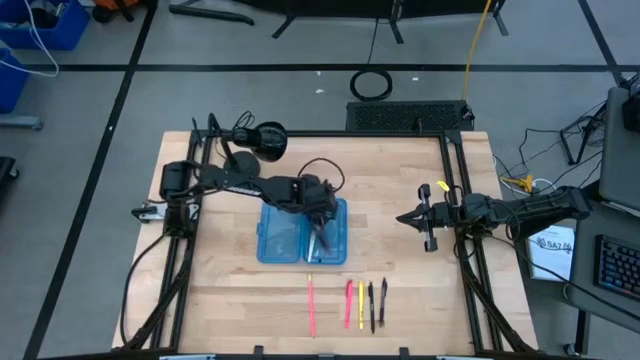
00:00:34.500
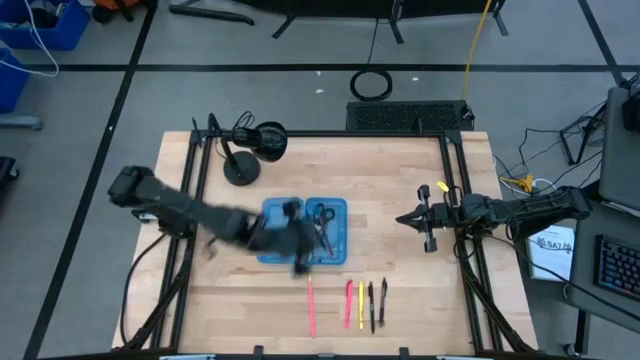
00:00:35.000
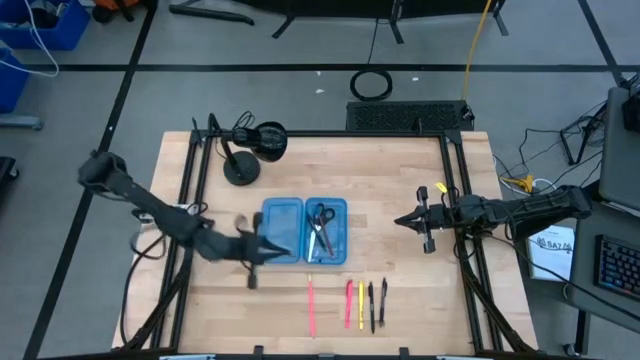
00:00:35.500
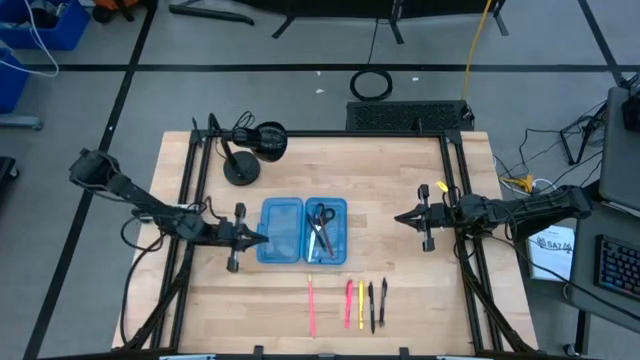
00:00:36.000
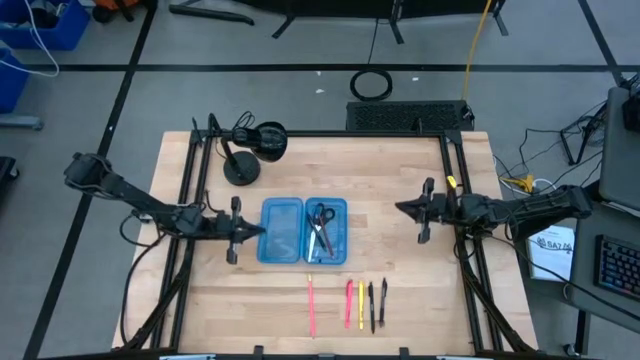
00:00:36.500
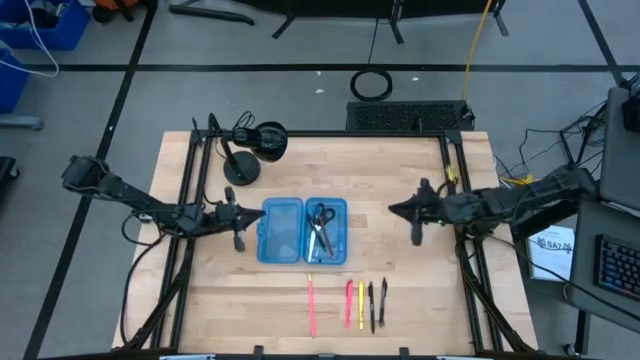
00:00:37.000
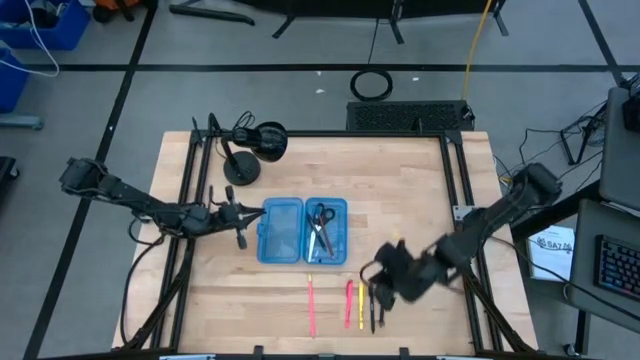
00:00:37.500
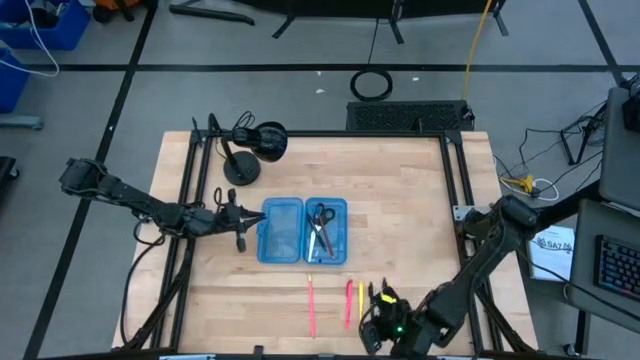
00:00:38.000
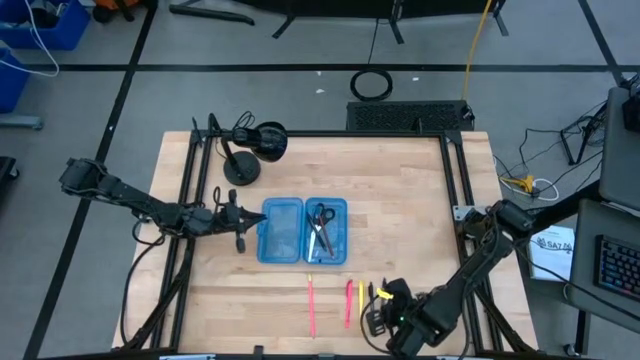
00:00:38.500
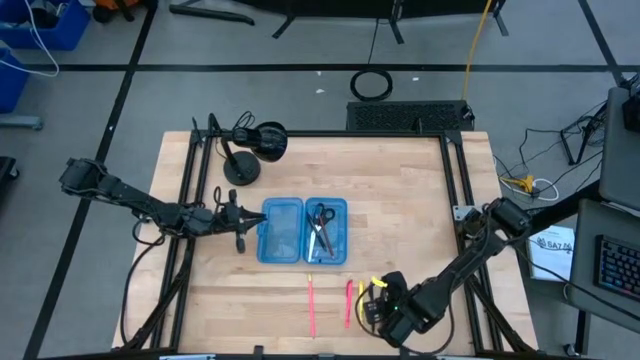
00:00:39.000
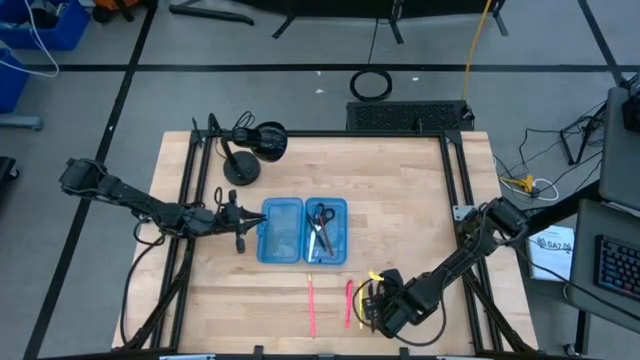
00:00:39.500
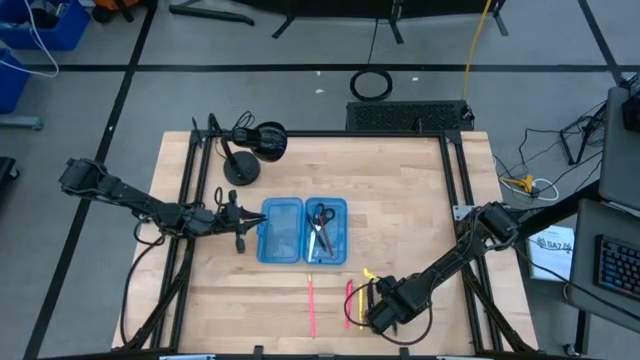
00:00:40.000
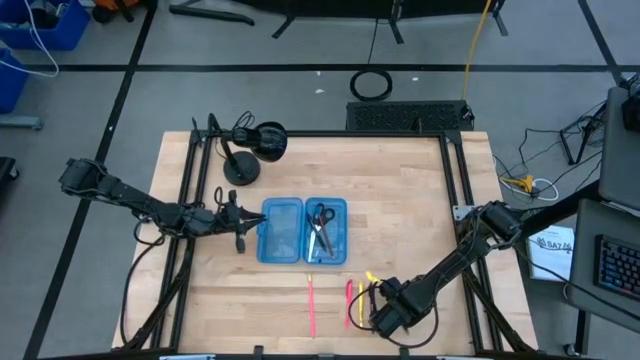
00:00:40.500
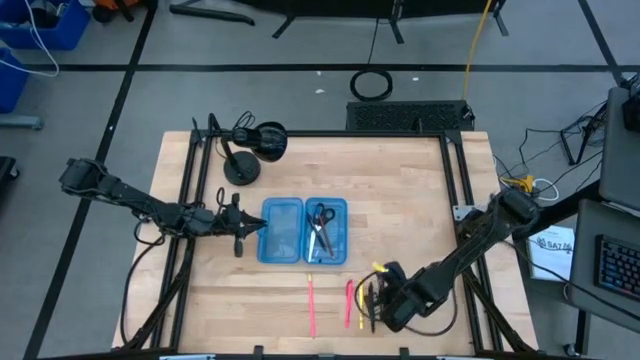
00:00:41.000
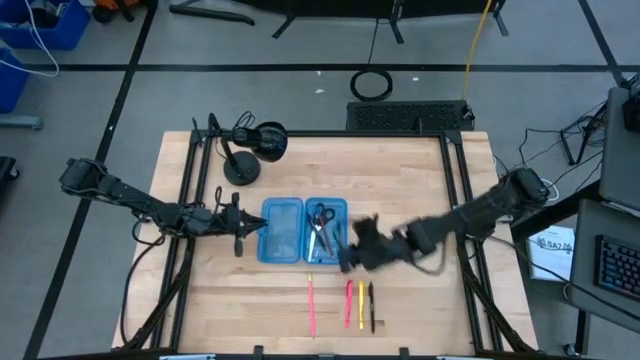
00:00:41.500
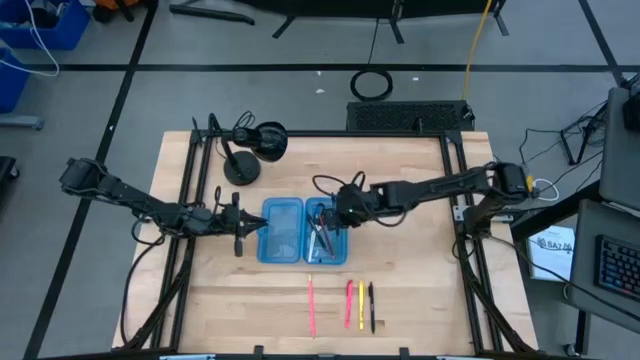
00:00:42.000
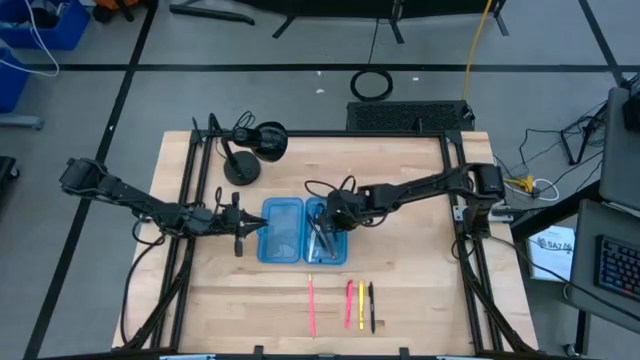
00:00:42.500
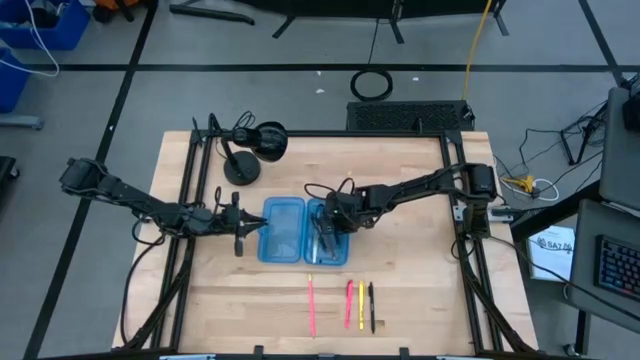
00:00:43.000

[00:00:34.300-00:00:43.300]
Task: Pick & place school supplies into a supply box
Put the black pen into the blue box

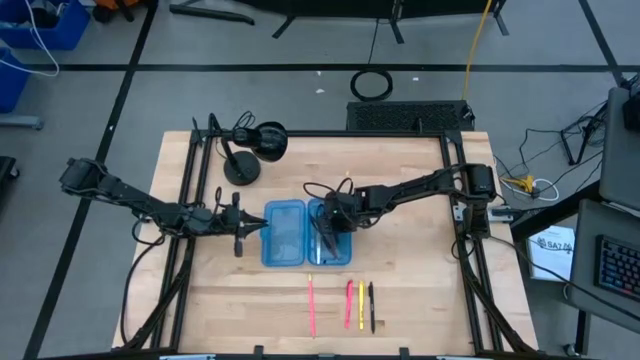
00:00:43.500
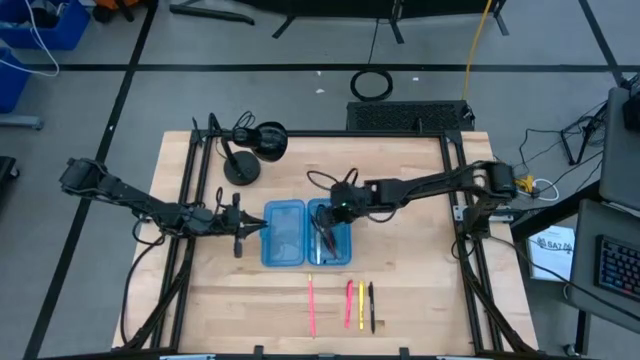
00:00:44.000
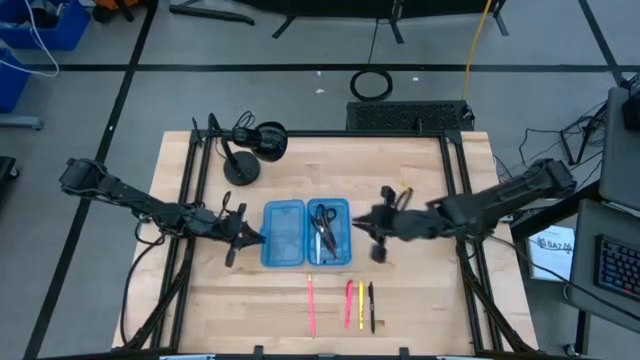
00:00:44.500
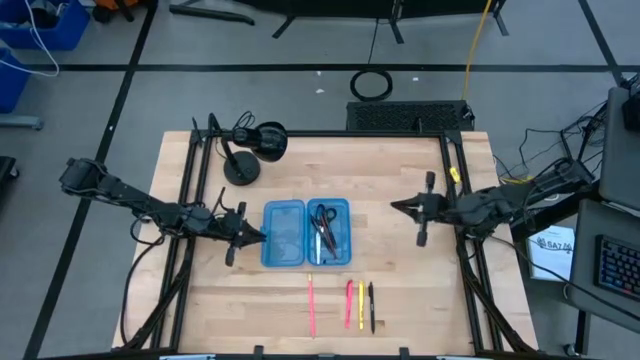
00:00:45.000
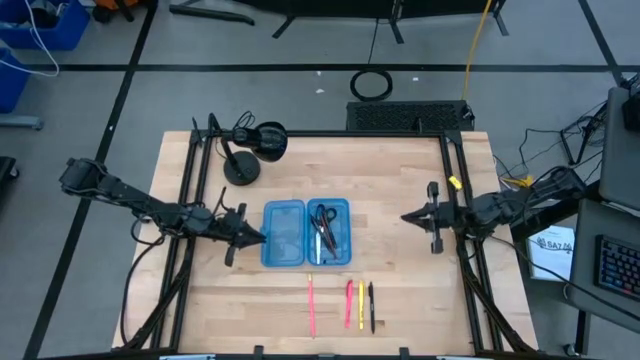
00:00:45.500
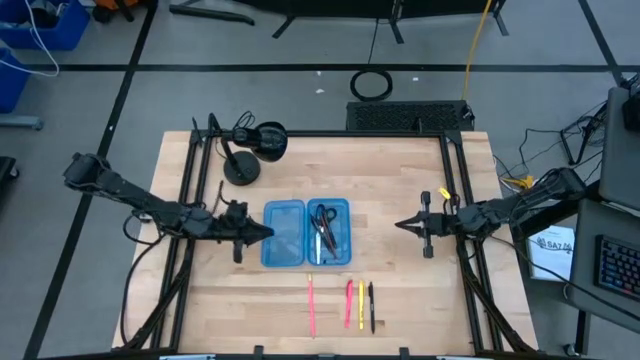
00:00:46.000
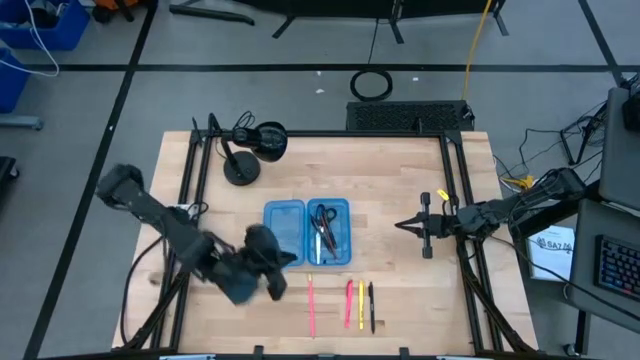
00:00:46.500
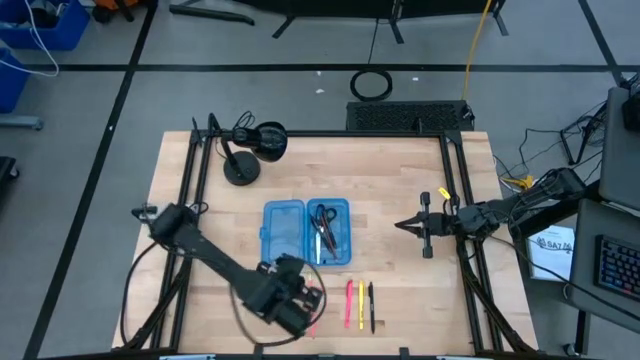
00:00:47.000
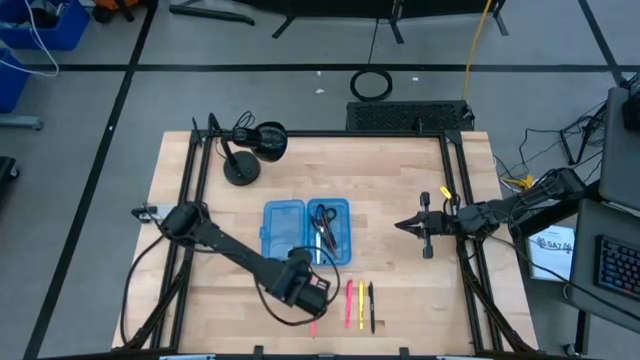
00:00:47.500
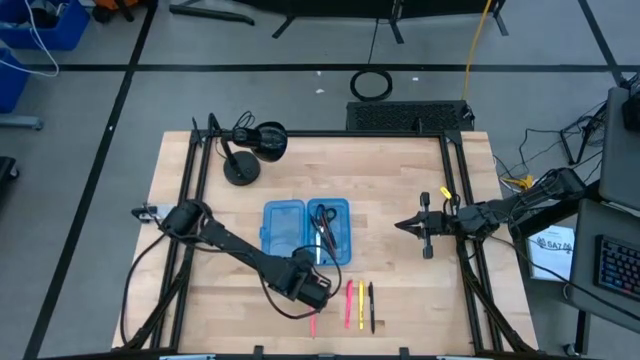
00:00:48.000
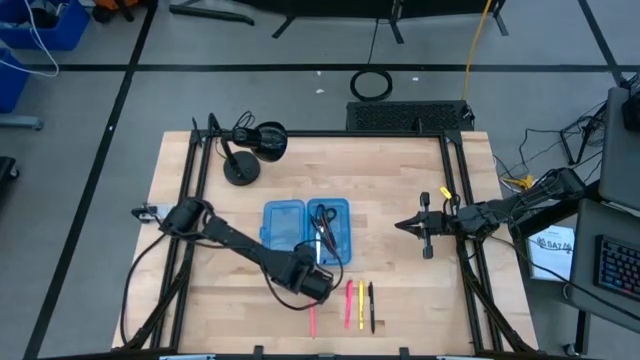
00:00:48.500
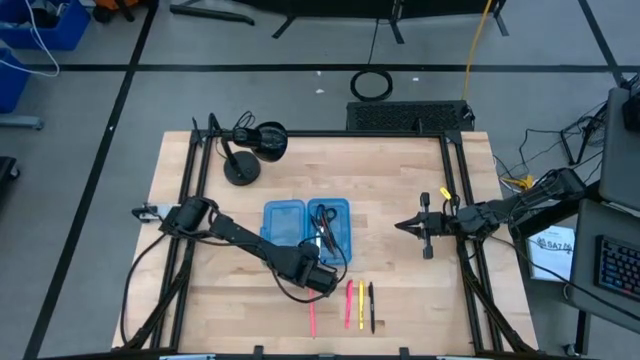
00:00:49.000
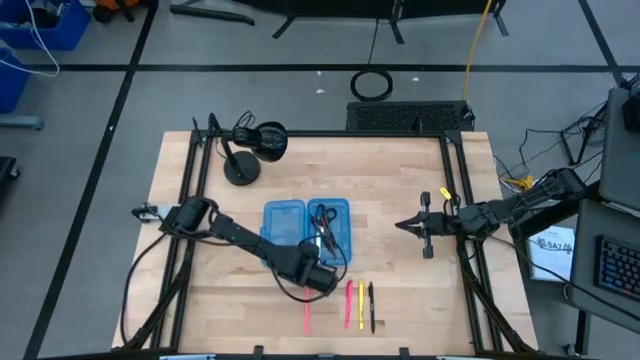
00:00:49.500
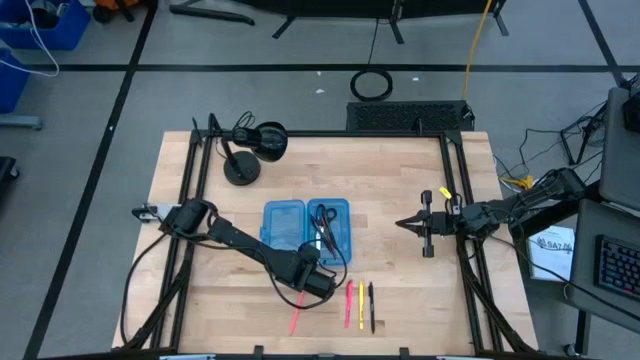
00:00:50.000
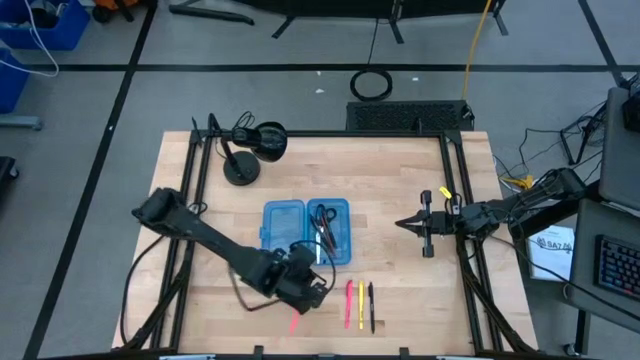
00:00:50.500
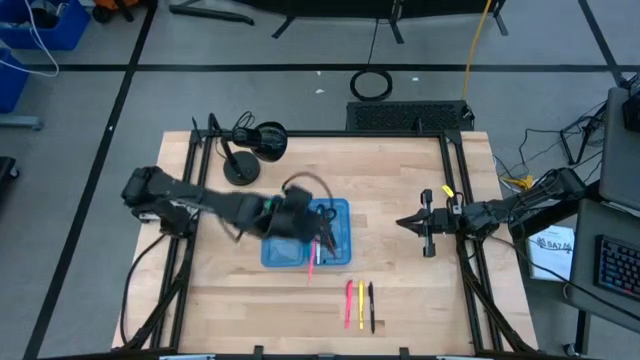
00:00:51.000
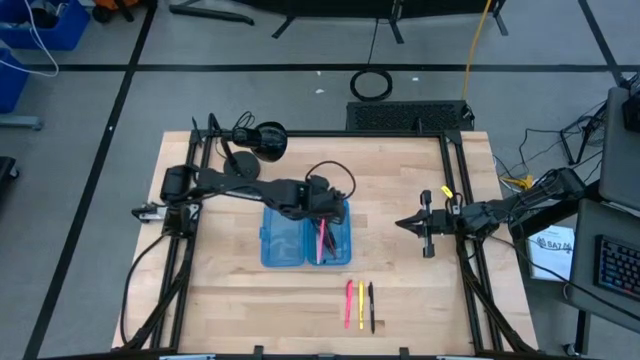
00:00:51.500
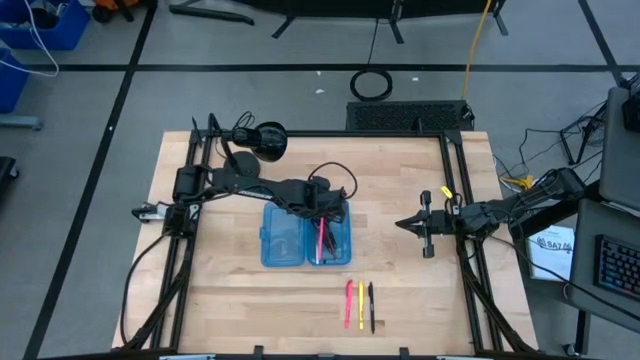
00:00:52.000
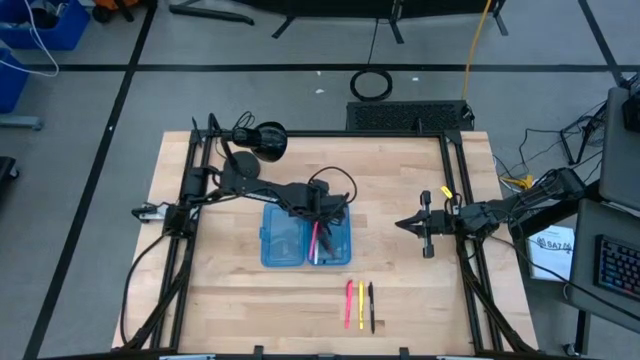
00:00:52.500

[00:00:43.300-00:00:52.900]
Put the pink pencil into the blue box

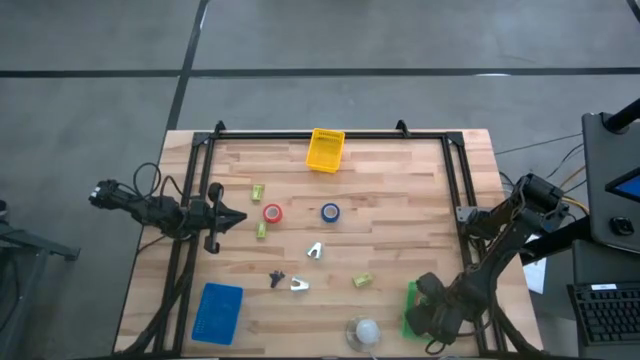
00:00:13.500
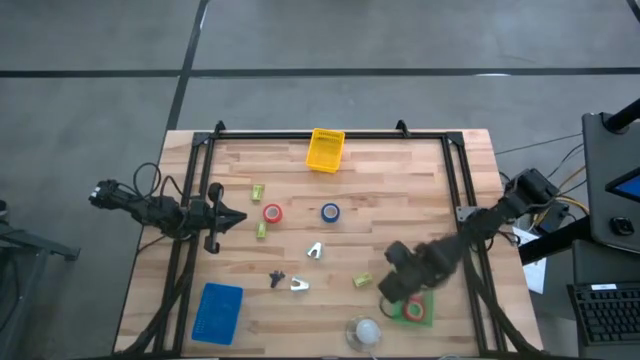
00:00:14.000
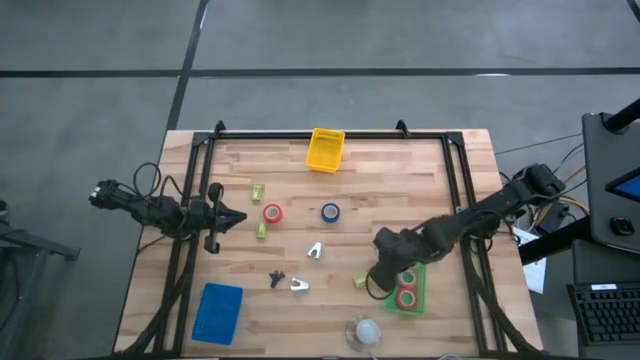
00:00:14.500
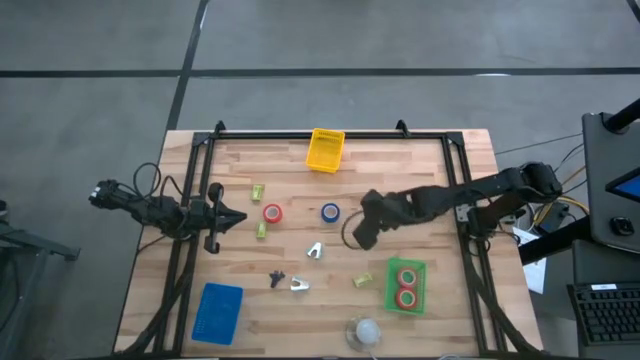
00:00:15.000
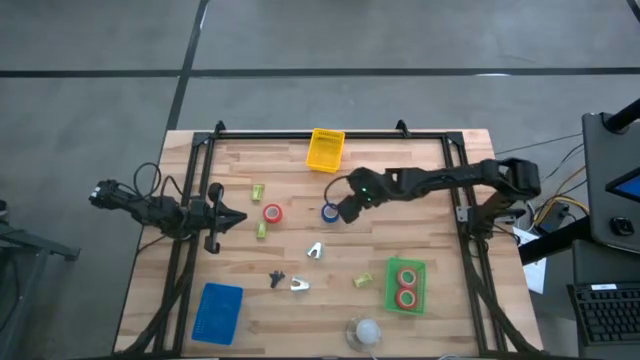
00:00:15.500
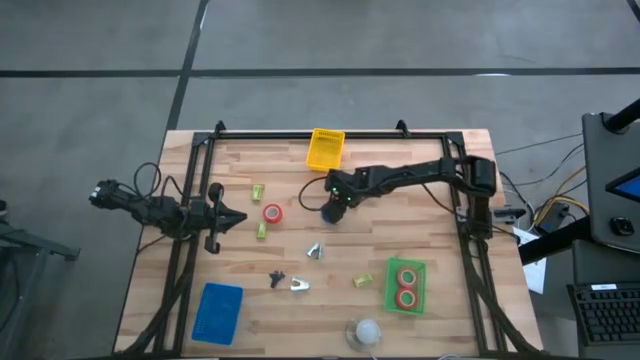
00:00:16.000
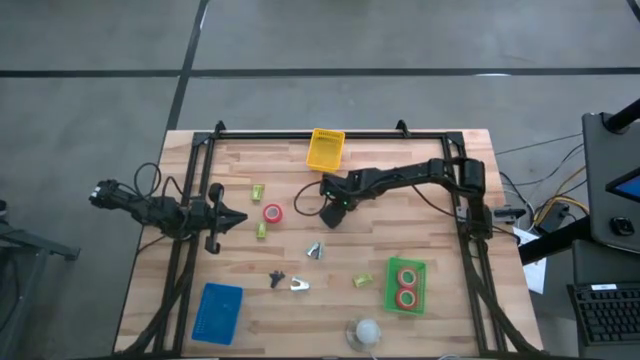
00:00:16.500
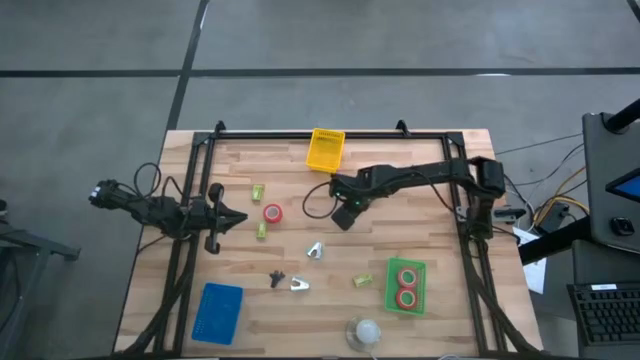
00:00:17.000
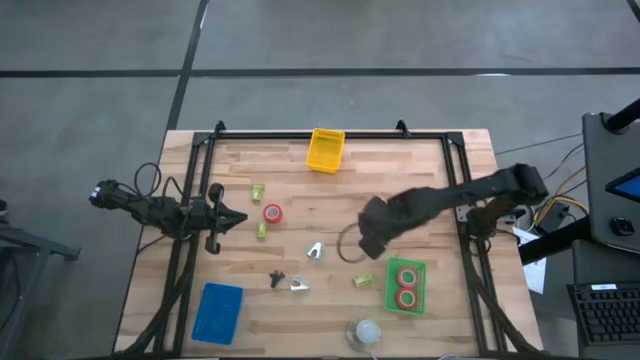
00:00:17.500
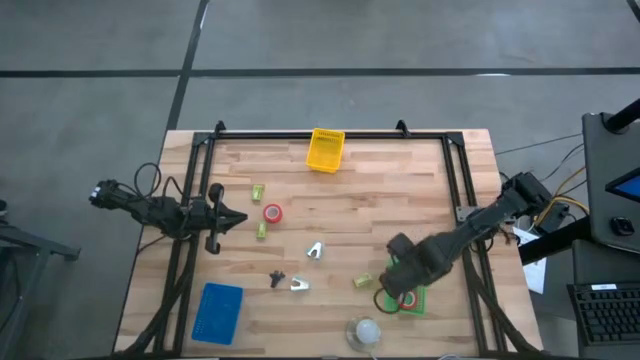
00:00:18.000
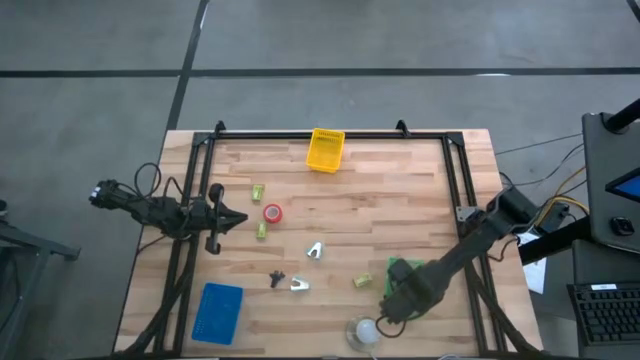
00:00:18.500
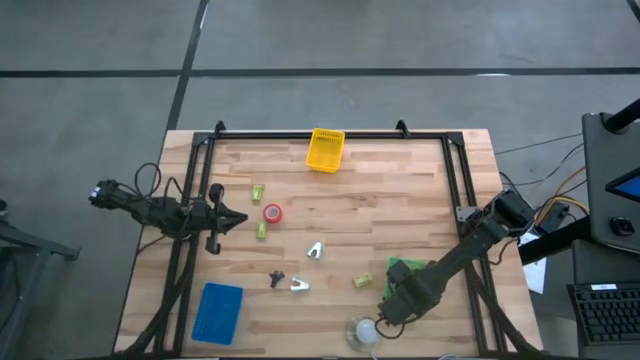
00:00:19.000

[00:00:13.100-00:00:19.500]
Task: Pick and place Stapler, Stapler remover, tape
Put the blue tape into the green bin
